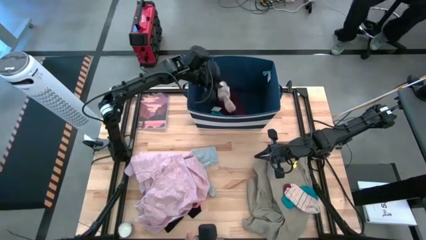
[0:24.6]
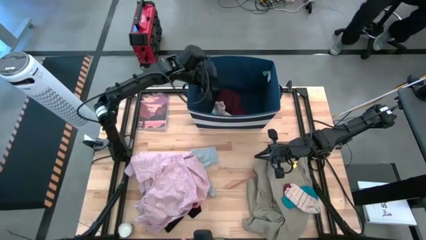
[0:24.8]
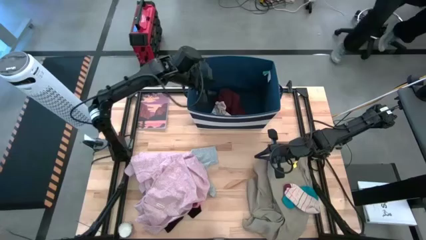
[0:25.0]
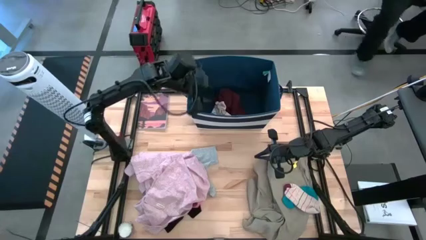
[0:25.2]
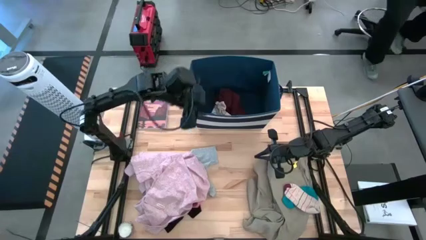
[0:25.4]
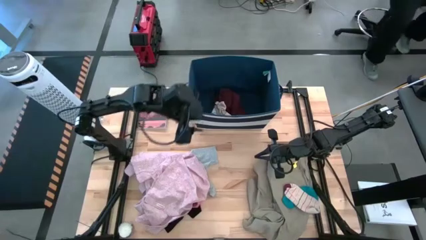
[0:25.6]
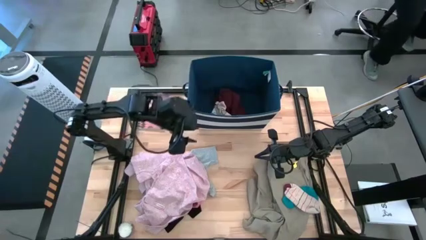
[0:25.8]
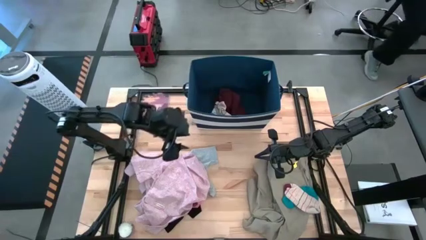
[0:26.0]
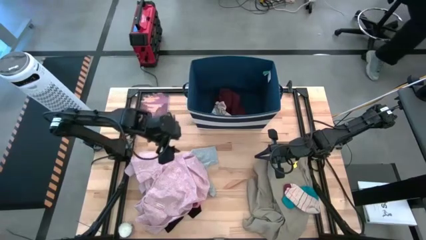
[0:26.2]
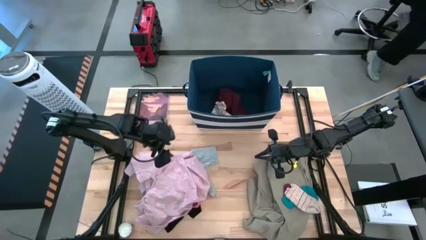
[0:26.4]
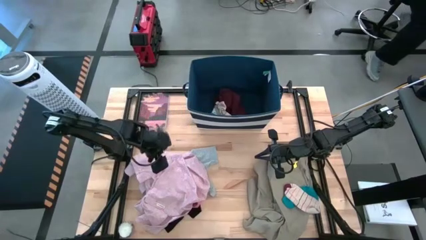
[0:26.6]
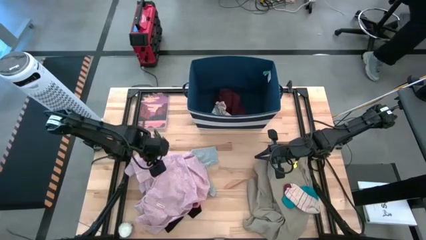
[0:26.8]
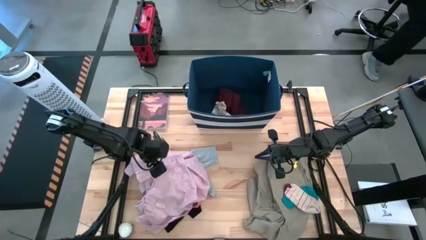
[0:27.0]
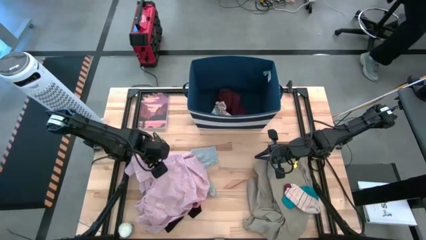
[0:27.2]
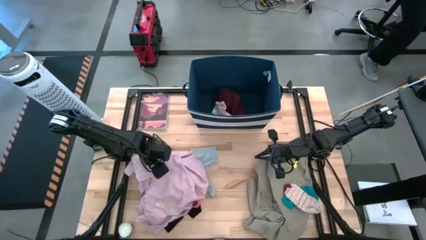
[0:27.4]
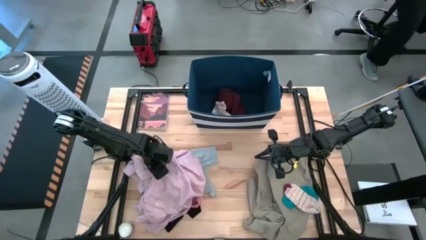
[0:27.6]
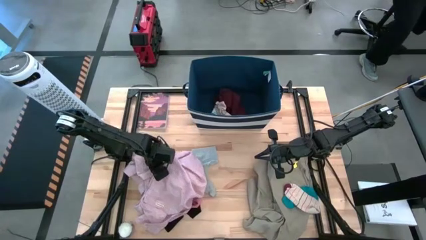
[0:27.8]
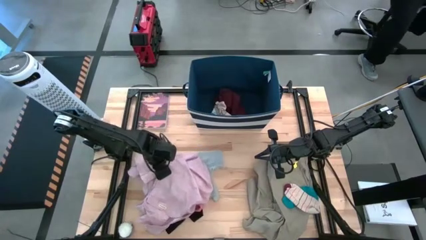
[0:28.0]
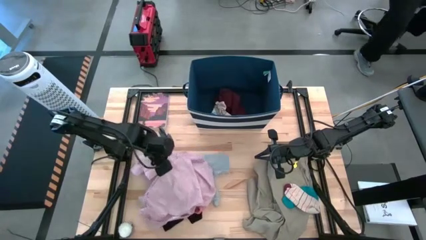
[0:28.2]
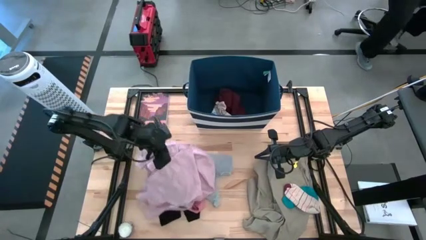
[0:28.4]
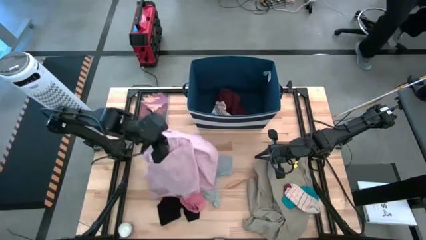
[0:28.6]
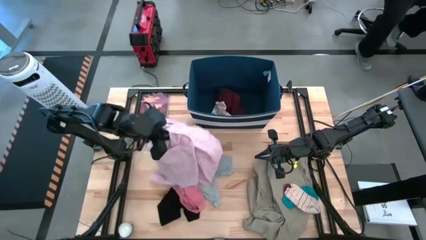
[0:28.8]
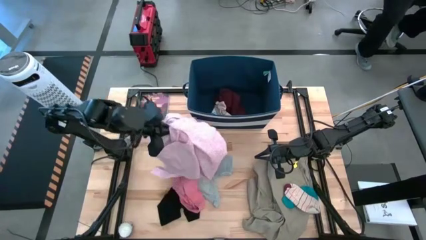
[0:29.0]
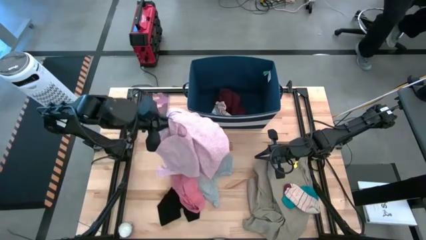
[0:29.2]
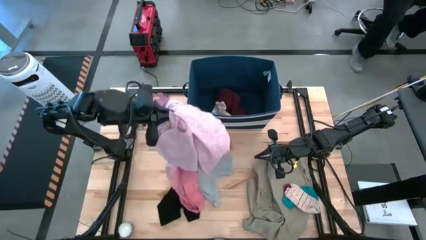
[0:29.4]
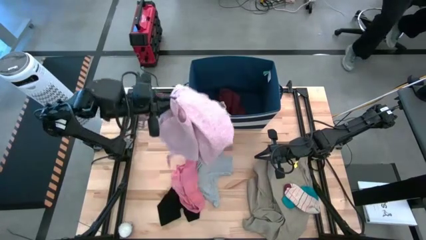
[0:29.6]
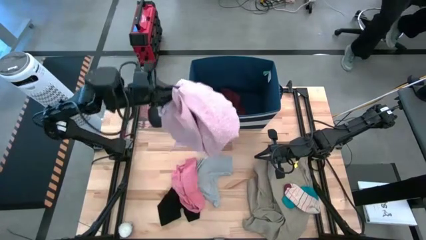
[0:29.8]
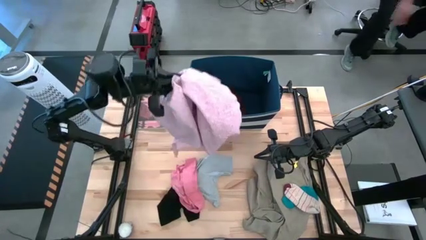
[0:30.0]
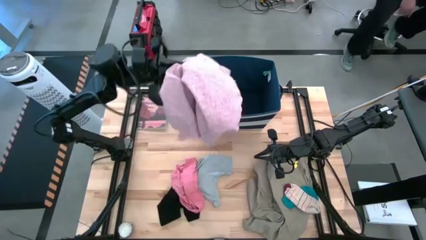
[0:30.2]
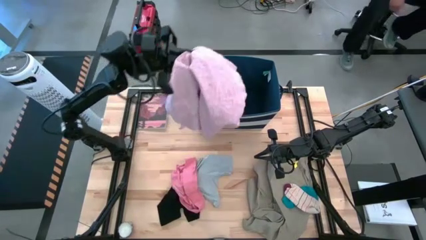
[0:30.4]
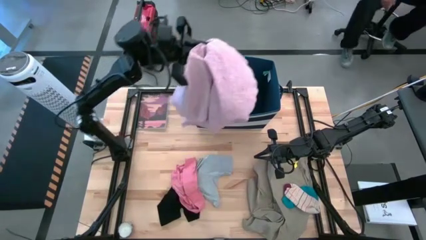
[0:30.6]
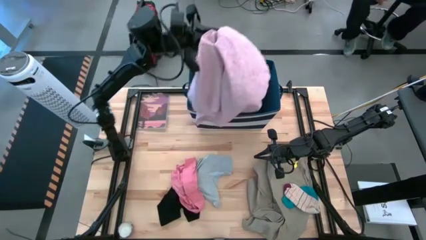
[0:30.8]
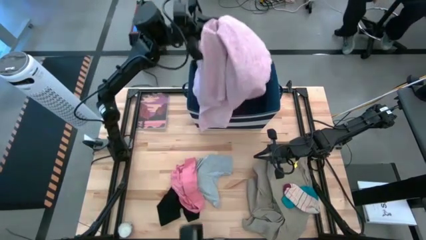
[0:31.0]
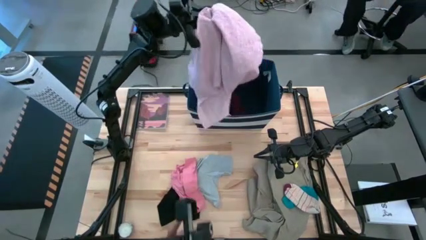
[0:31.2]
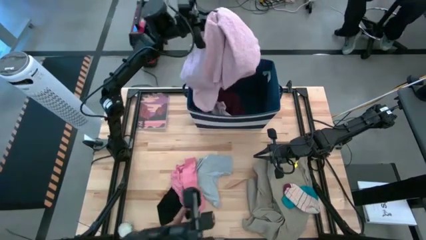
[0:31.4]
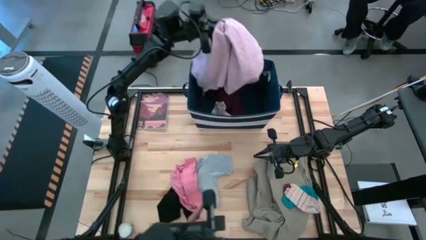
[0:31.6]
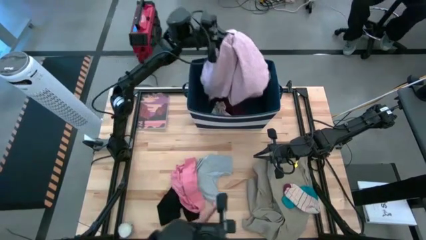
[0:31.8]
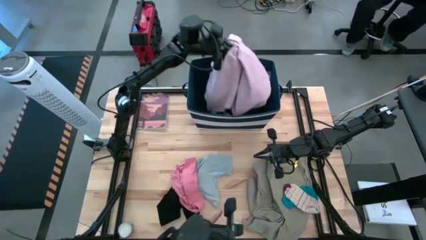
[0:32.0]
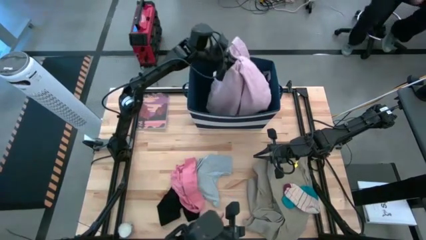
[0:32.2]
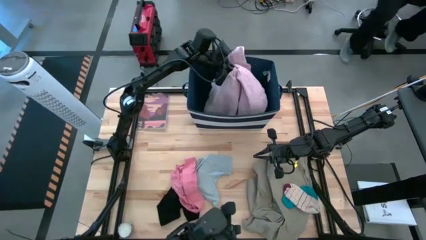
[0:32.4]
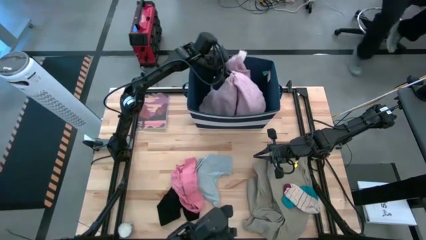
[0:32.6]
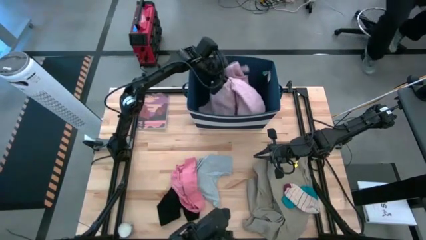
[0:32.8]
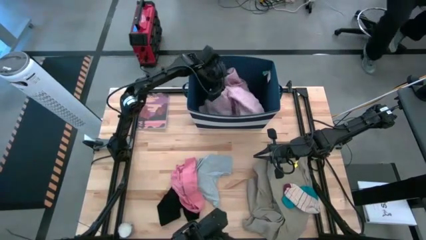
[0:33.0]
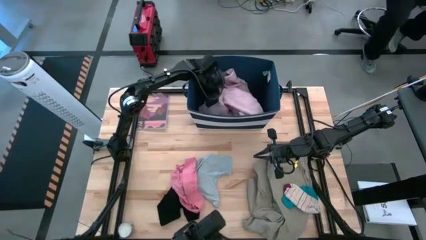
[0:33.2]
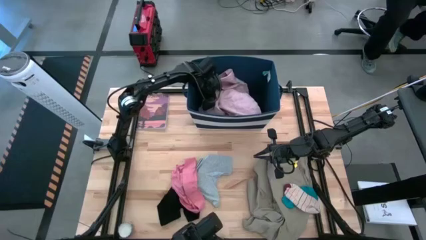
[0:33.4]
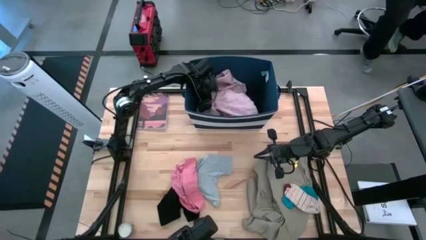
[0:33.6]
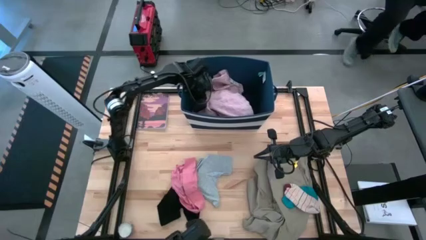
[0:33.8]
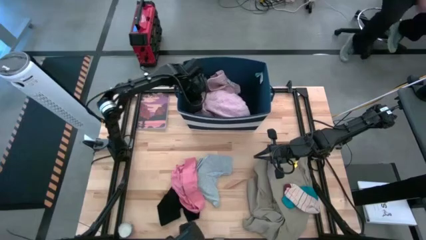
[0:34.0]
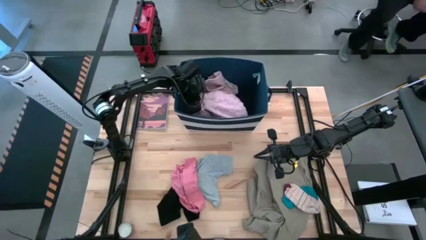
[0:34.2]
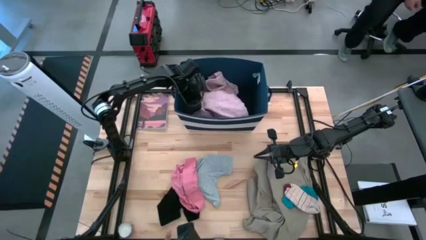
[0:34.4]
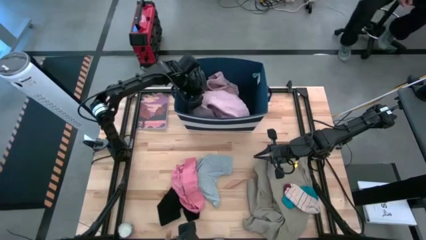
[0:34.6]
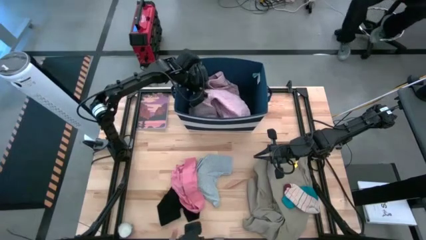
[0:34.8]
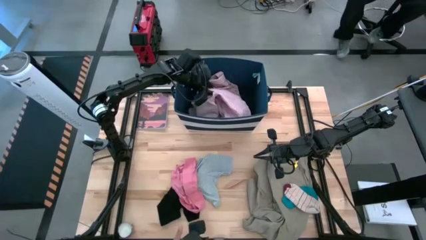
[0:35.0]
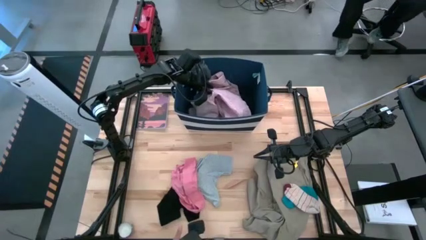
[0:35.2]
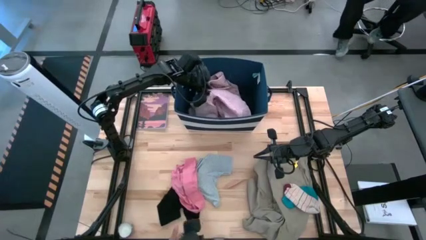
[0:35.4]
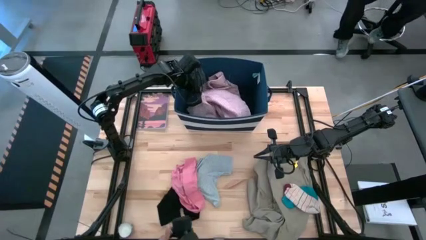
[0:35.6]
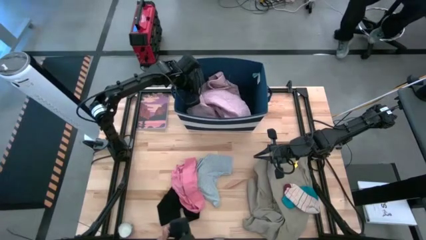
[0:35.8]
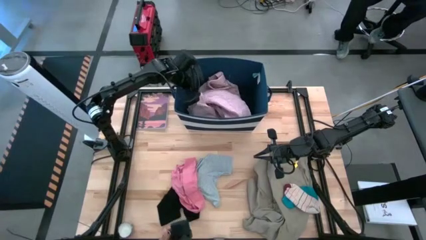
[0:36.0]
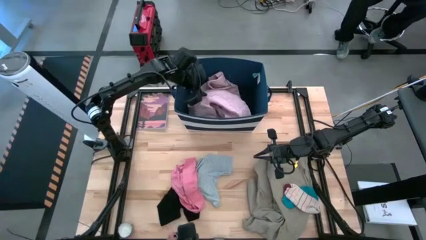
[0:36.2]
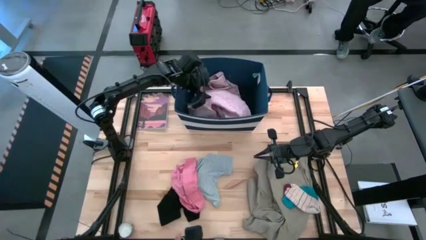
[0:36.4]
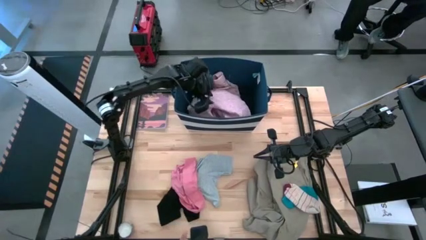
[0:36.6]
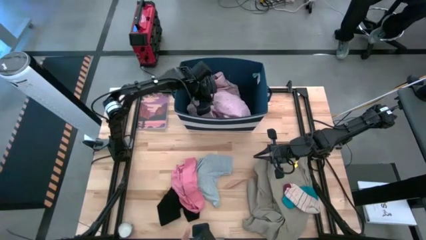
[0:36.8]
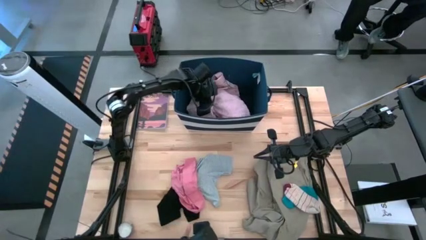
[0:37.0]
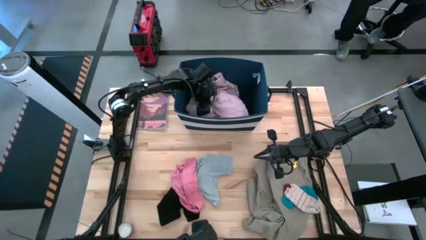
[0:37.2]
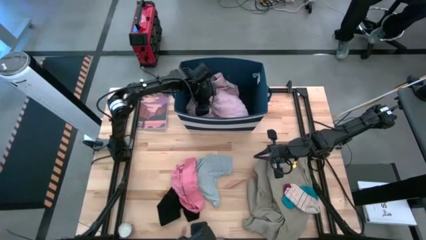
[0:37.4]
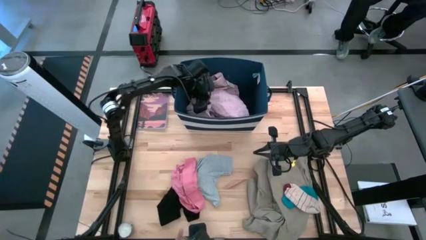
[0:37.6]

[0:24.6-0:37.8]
Task: Sort clothes
Put the pink polo shirt into the blue bin

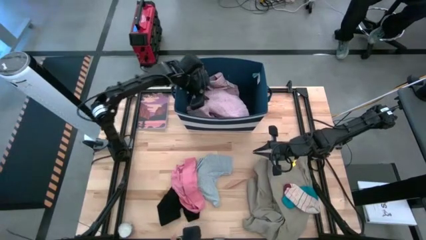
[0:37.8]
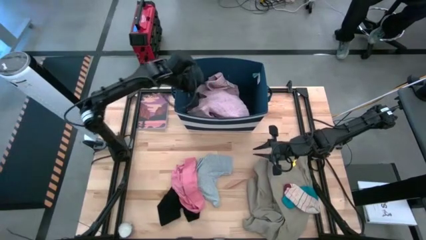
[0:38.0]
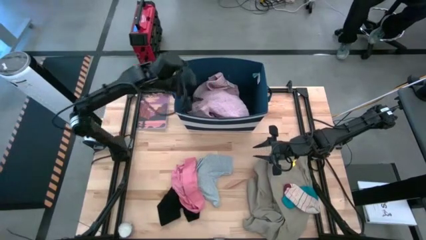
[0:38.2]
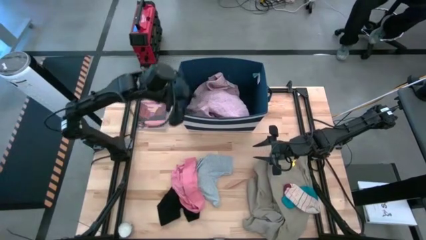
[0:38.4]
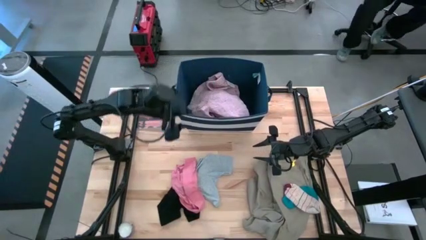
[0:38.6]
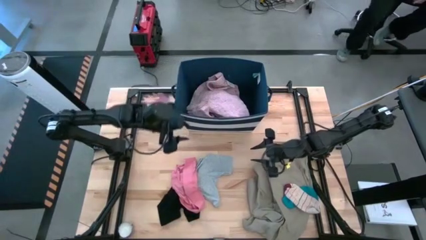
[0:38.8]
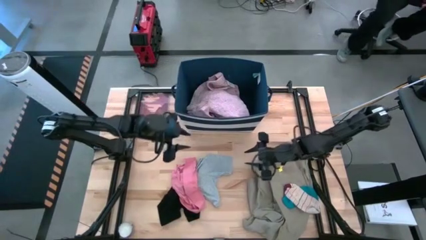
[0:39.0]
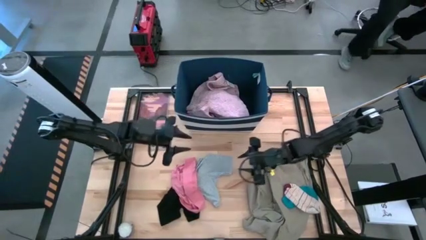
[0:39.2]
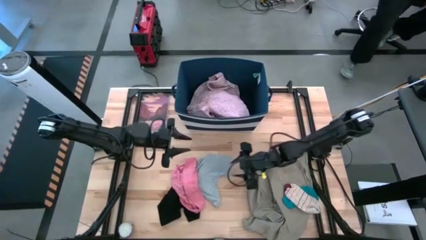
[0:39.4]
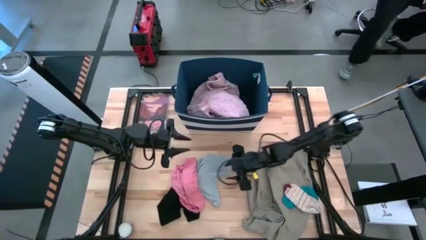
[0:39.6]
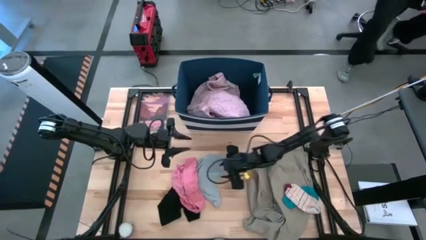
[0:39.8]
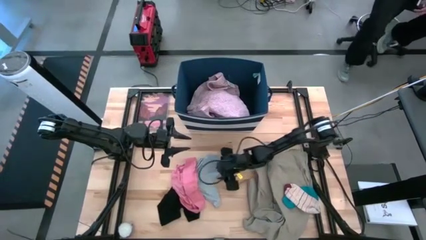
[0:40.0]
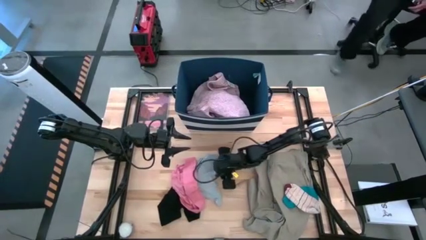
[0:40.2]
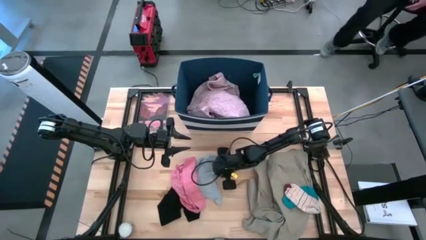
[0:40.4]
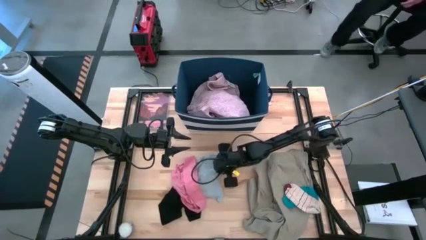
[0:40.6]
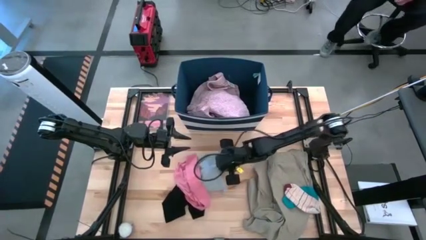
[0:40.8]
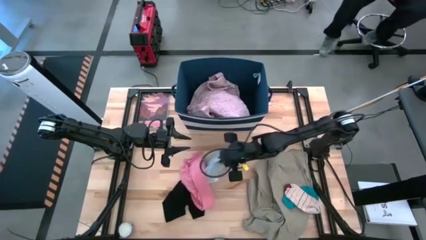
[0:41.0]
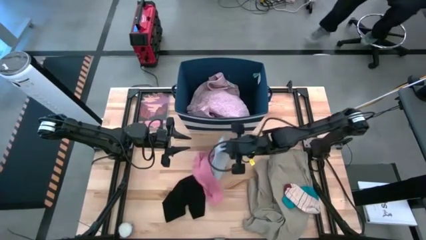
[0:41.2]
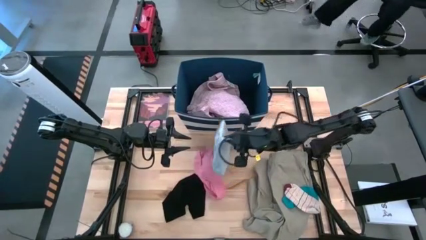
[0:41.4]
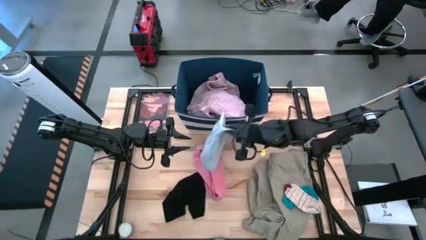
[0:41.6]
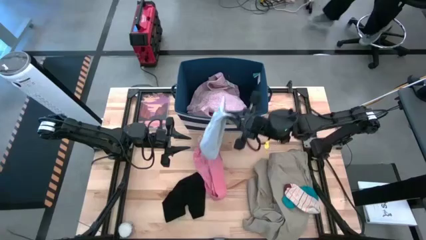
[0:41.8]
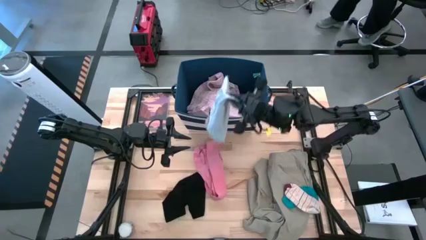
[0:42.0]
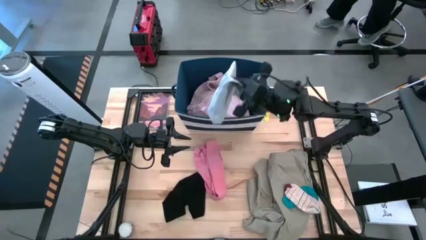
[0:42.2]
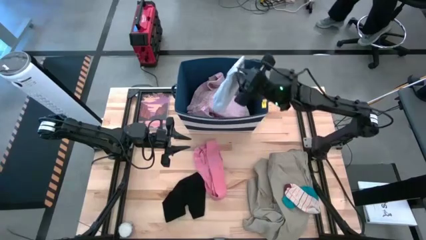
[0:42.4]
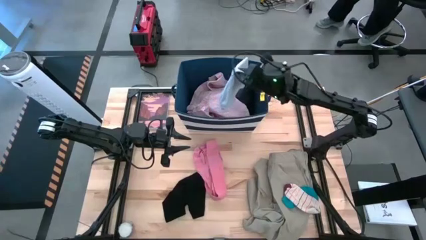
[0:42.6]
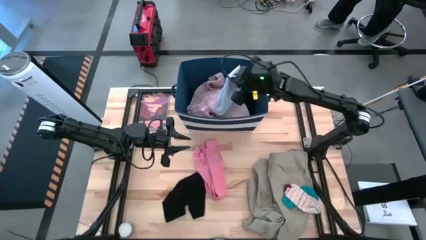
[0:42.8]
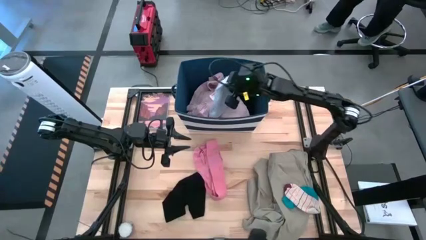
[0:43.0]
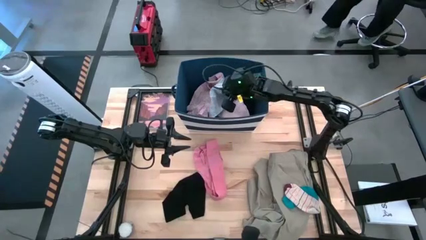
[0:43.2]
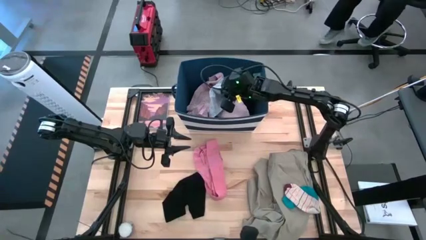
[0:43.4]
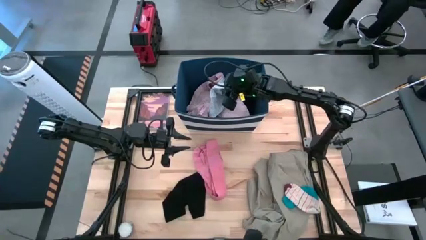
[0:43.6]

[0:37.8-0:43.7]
Put the gray underwear into the blue bin
